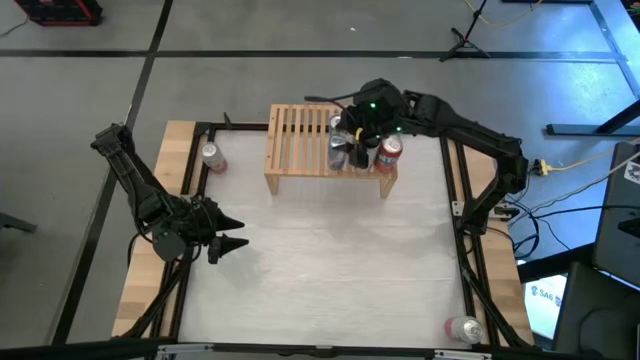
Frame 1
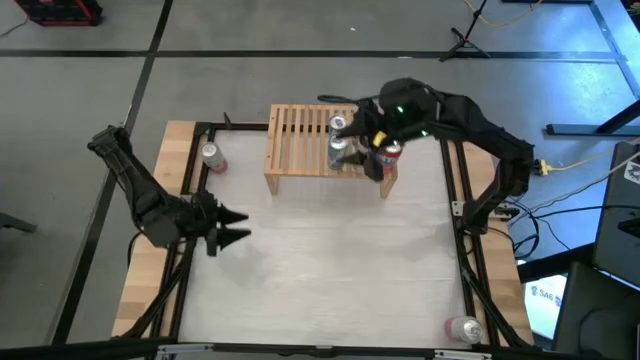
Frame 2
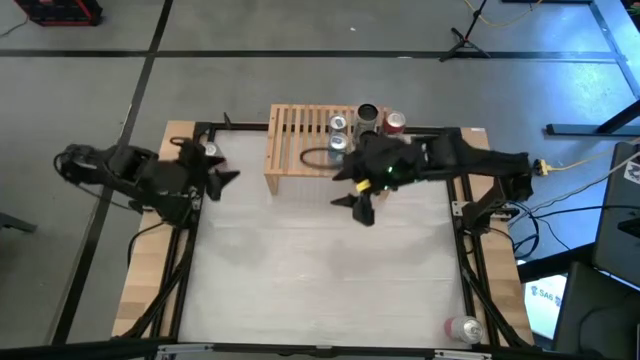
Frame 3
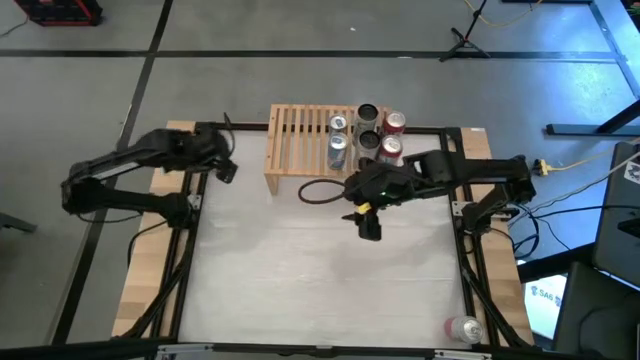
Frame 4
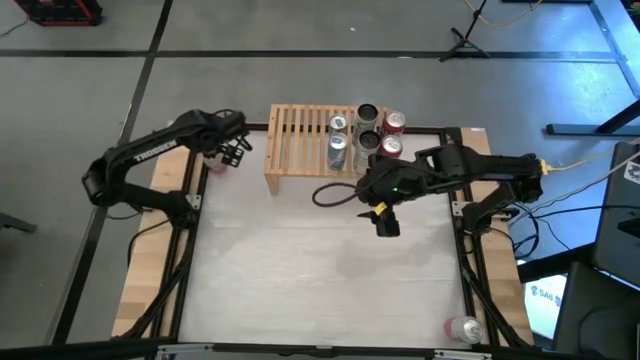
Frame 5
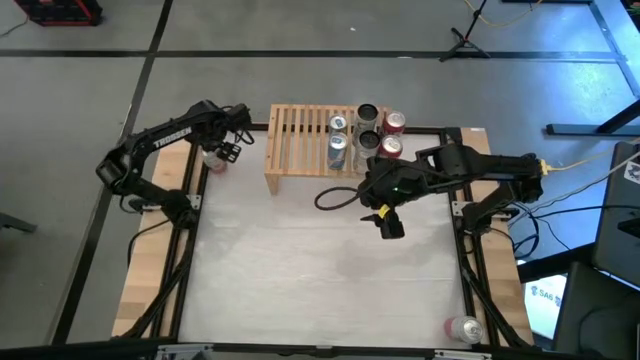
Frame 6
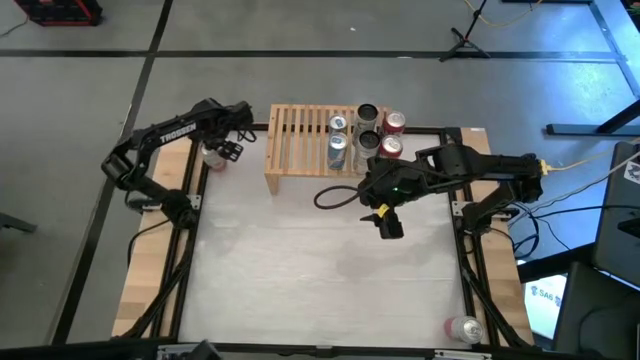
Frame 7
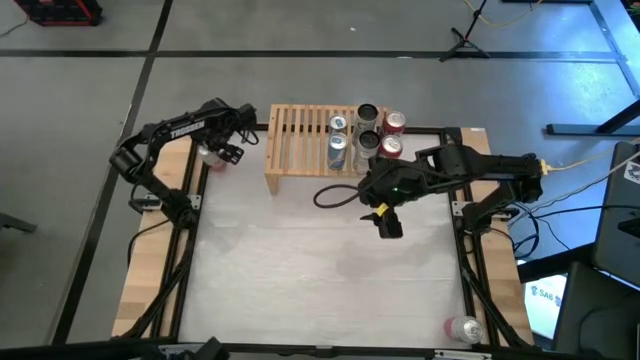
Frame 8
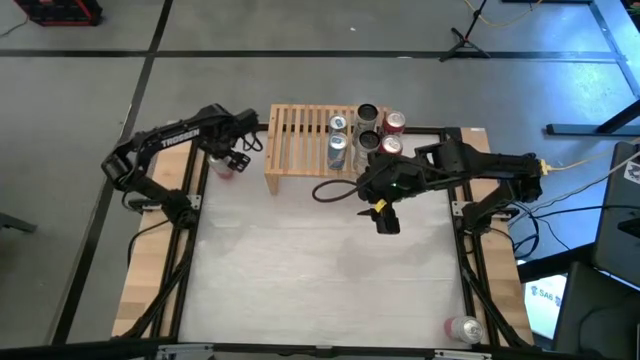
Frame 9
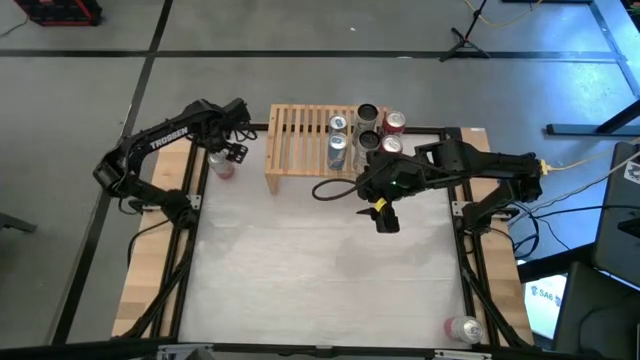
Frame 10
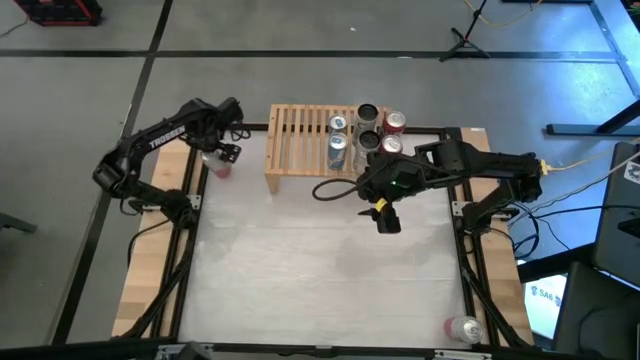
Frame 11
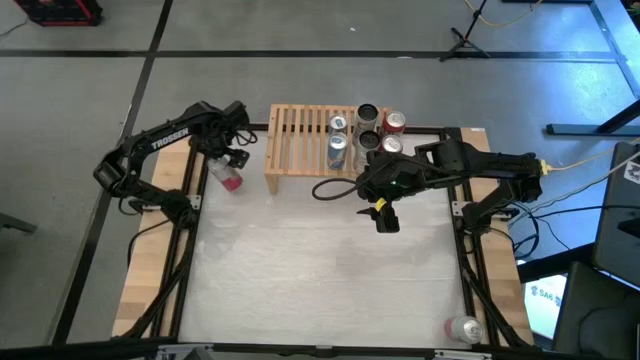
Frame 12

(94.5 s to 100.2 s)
Task: Place canned beverage on shelf
Put the top pink soda can on the shelf

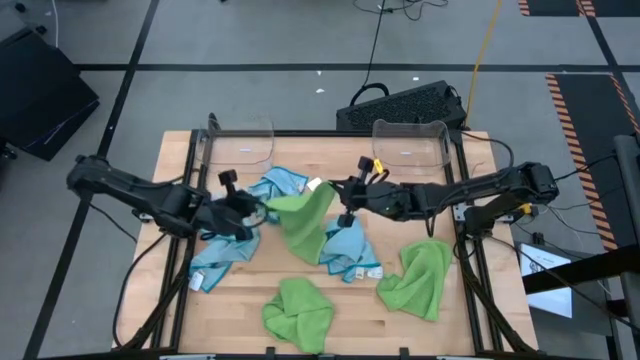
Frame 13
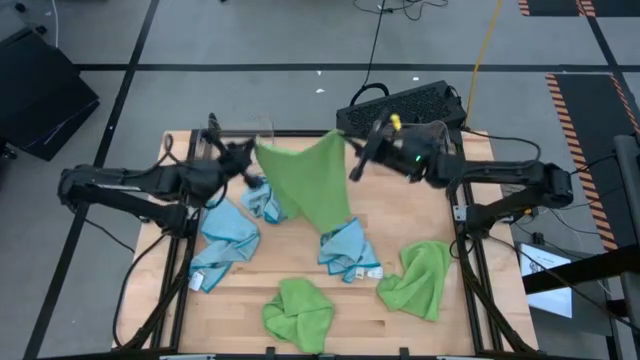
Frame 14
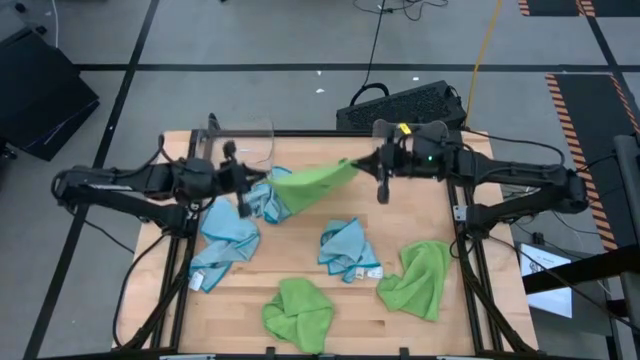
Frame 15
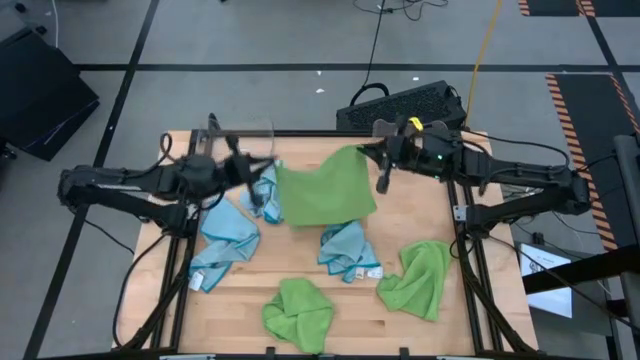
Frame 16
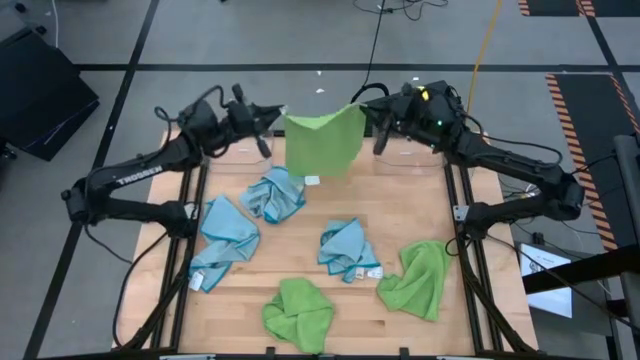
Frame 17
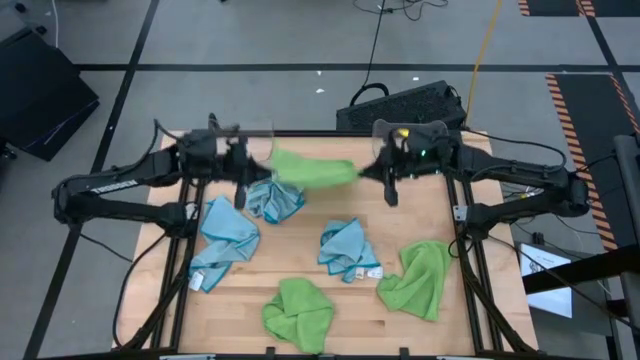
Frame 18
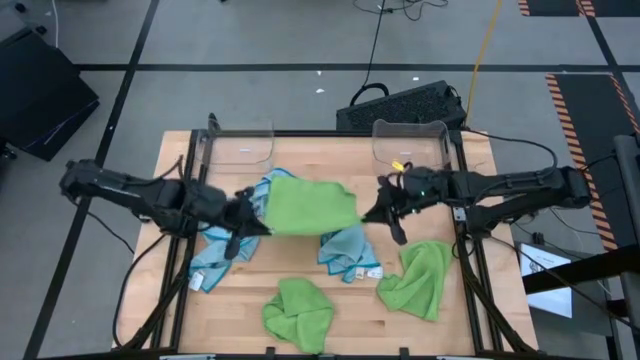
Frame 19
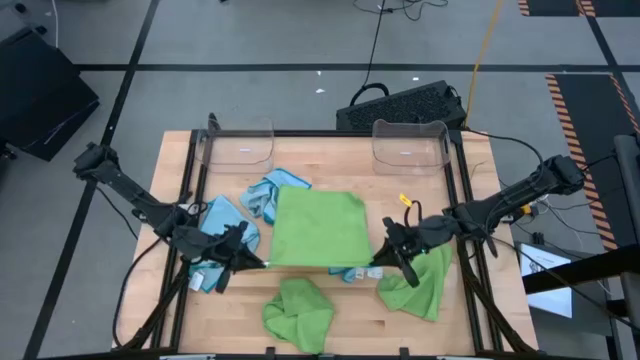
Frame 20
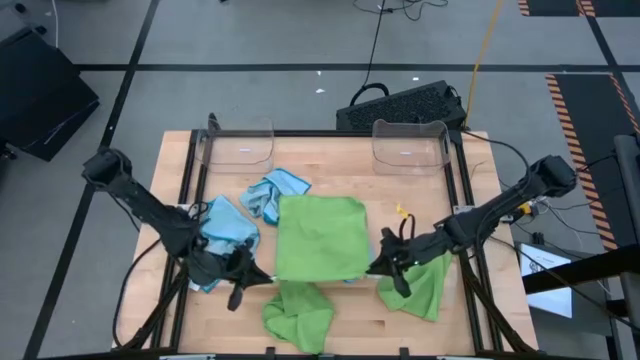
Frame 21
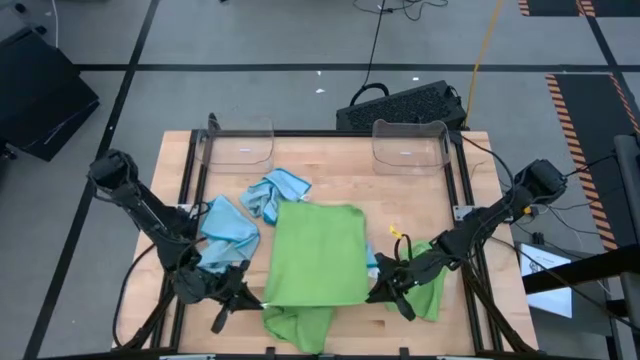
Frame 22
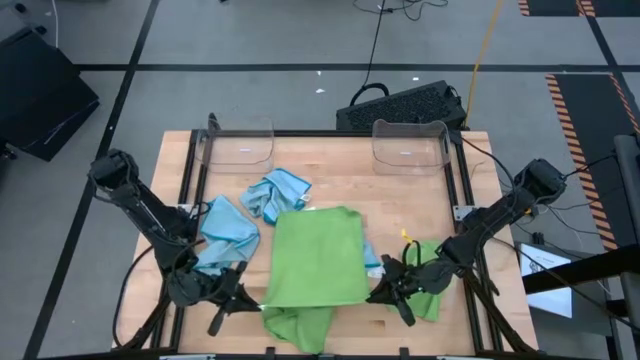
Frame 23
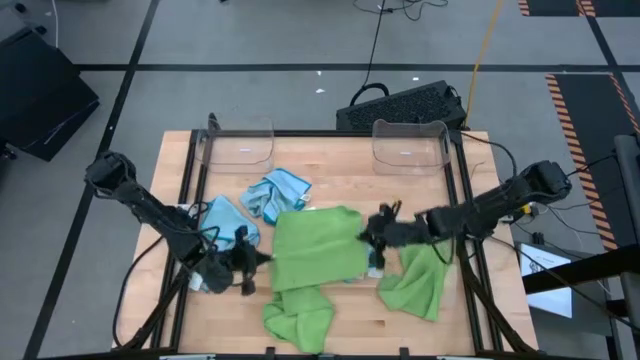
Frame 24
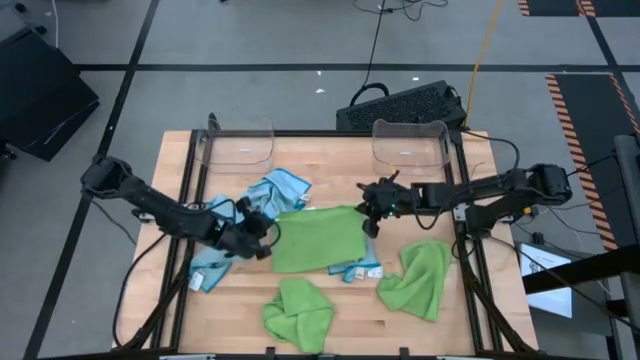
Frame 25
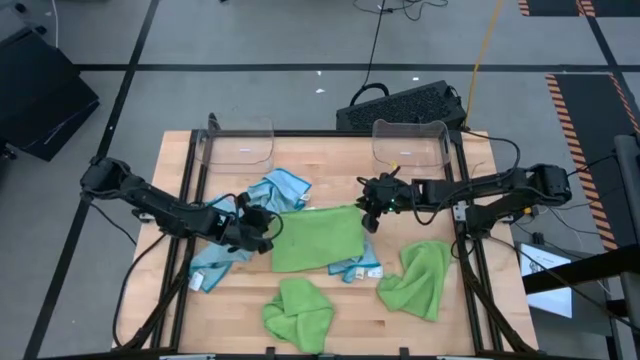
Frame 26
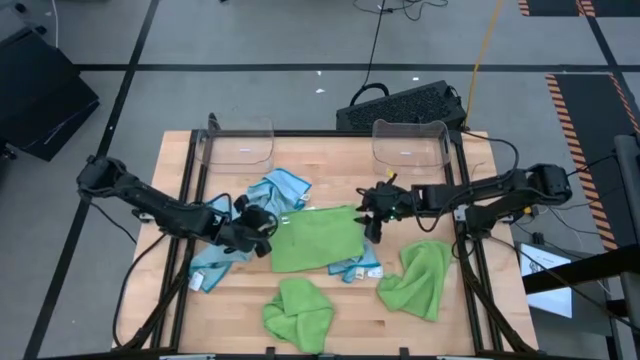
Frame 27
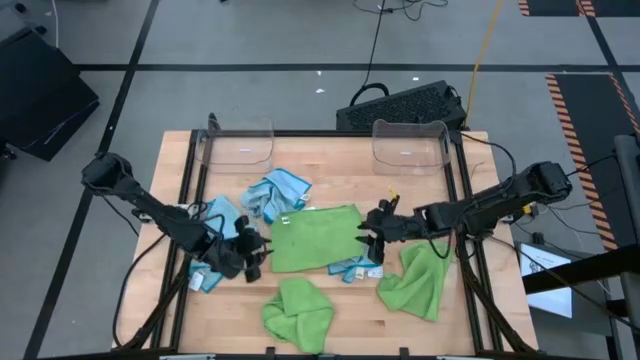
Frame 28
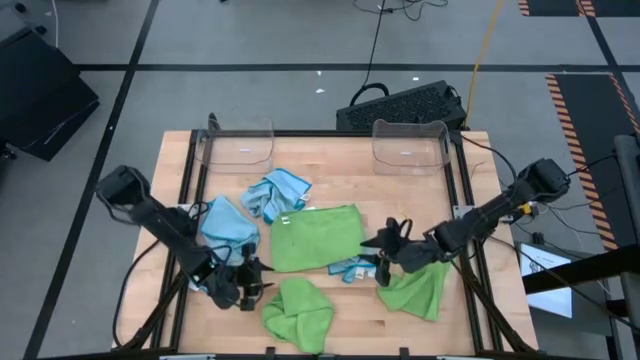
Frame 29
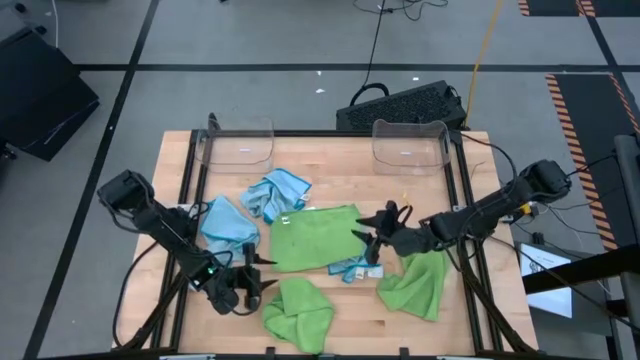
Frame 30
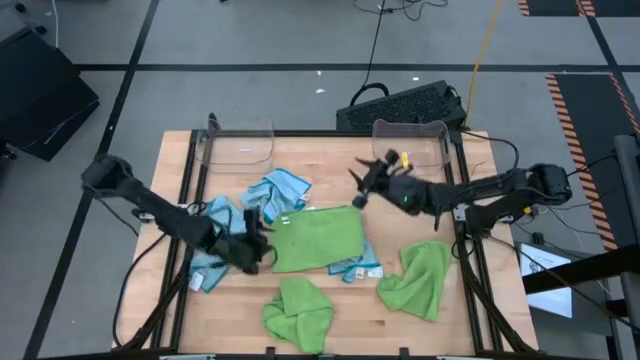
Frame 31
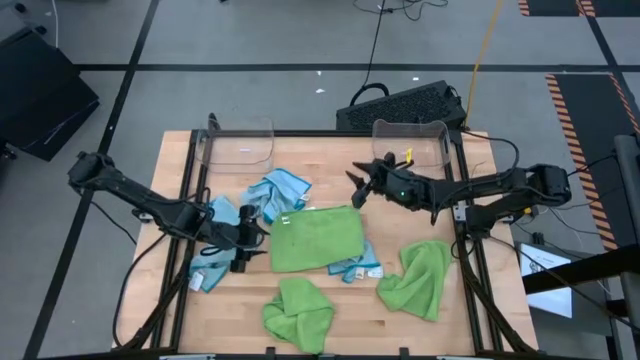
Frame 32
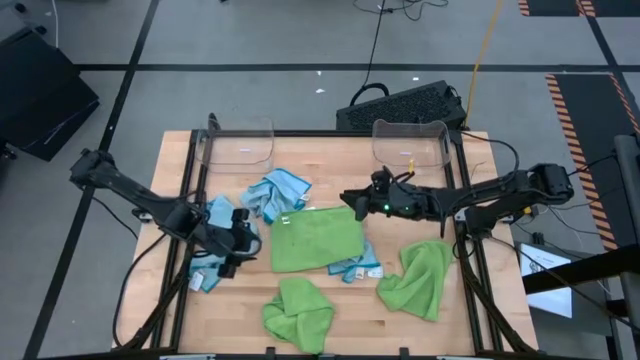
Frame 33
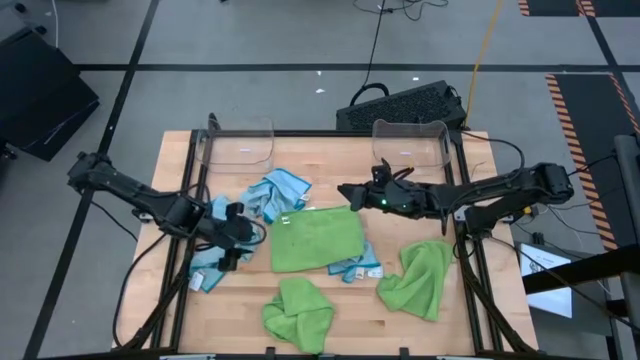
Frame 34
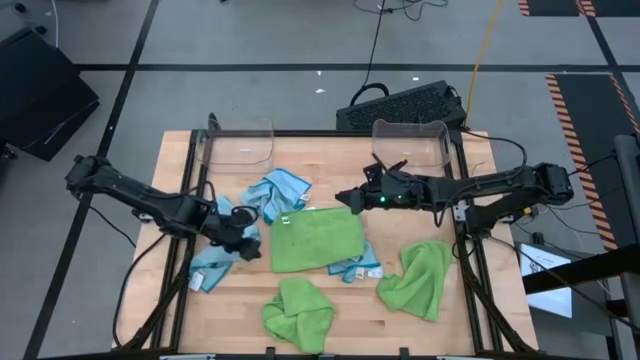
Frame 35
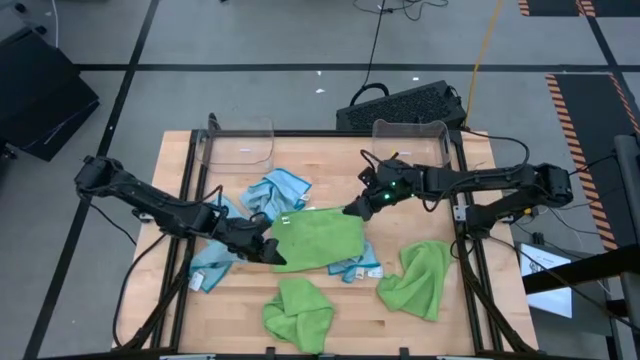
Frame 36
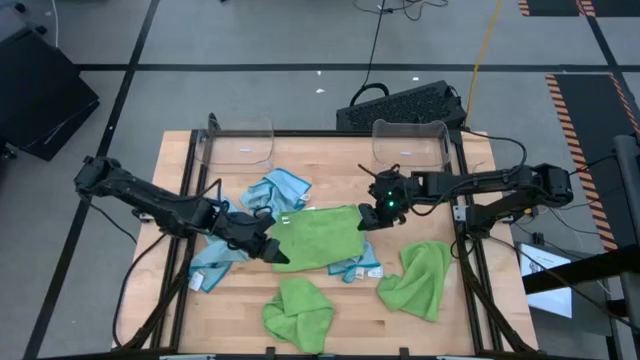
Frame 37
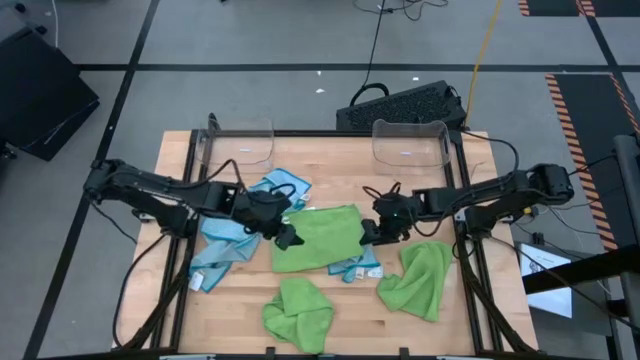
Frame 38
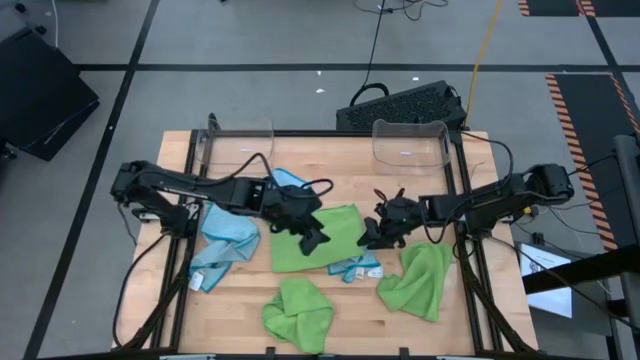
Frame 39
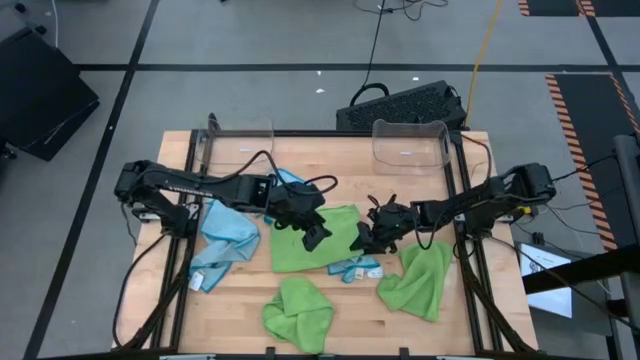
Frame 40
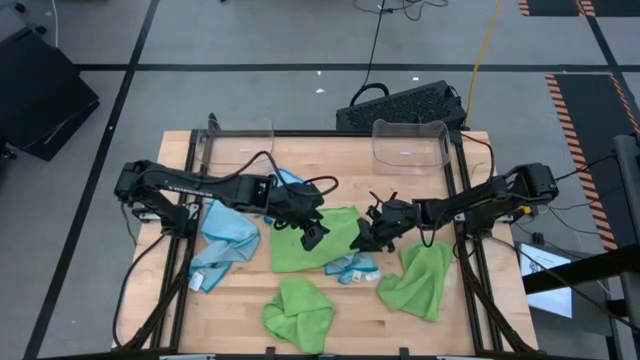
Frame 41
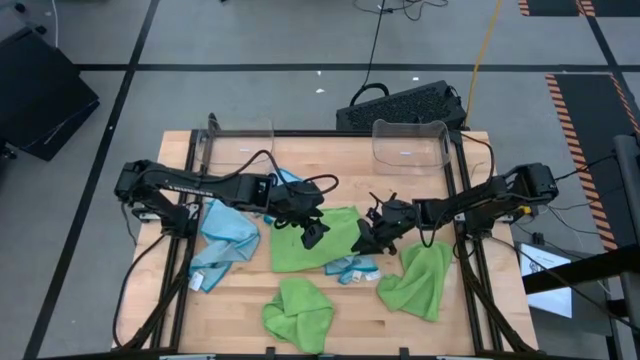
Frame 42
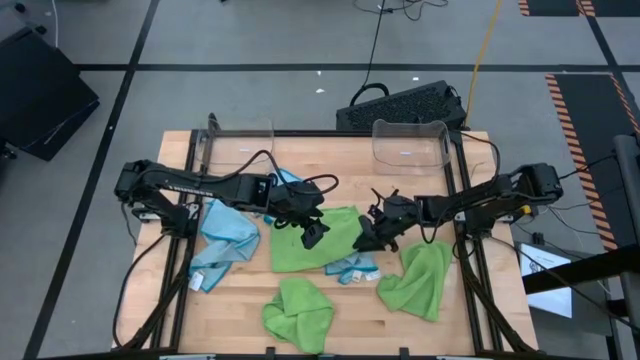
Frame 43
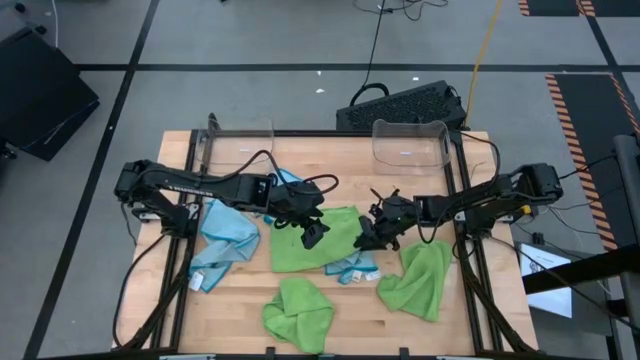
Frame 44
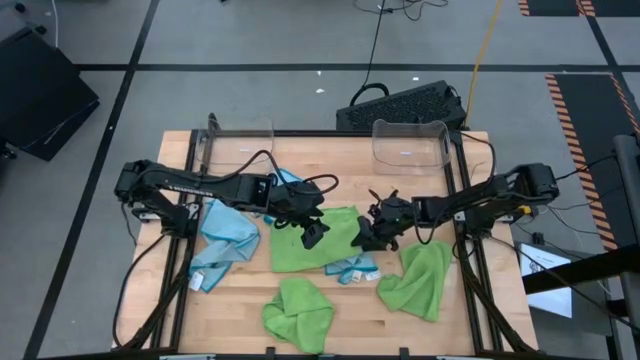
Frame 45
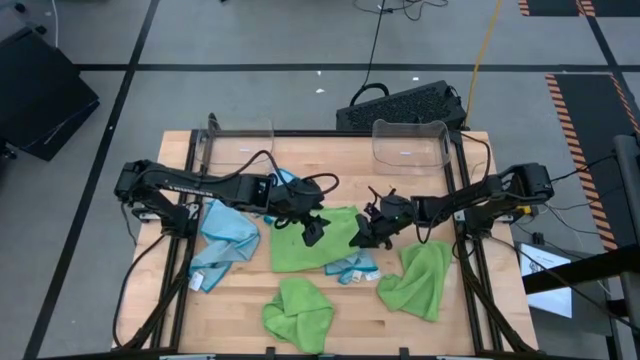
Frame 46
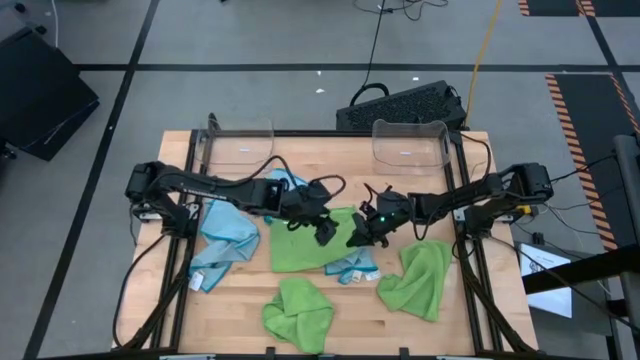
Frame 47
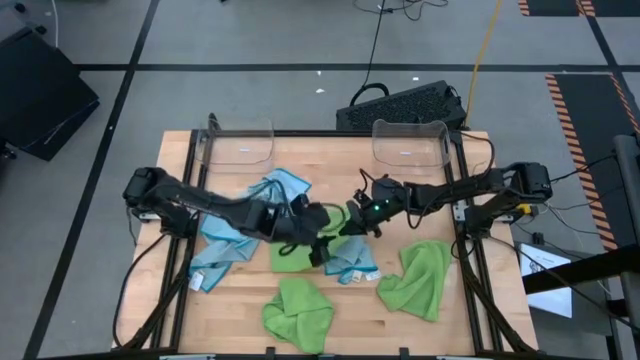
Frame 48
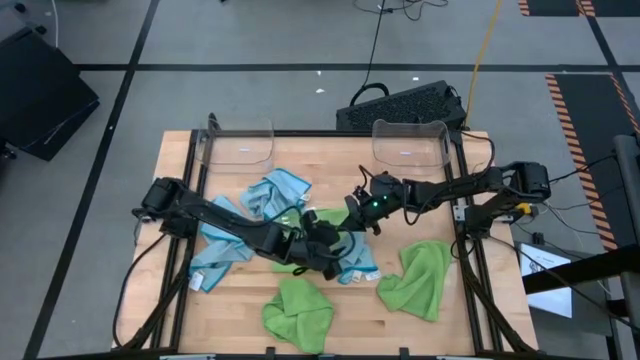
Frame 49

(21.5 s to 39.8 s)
Task: Sort microfiber towel by color & place in baskets
Fold the top green towel
